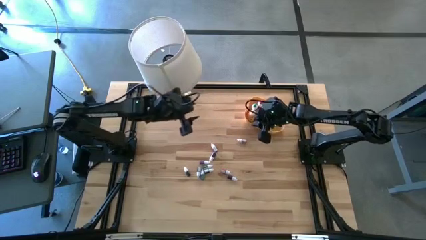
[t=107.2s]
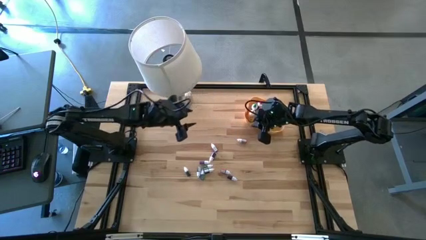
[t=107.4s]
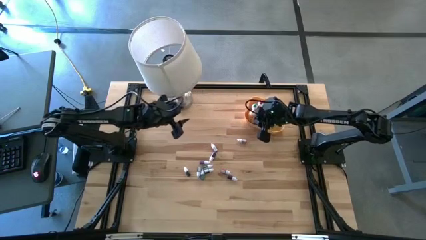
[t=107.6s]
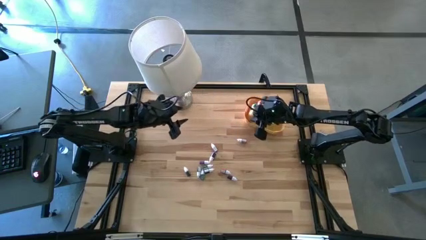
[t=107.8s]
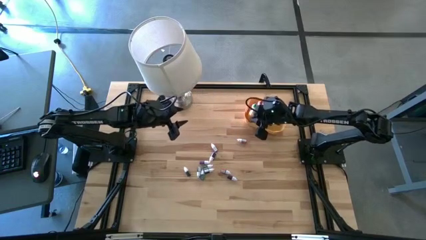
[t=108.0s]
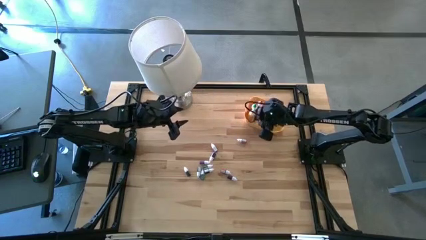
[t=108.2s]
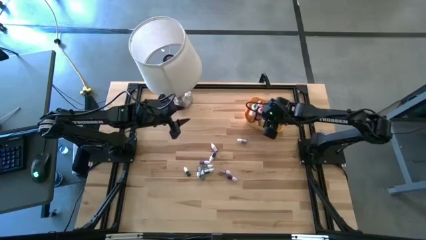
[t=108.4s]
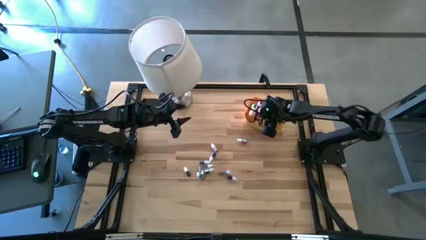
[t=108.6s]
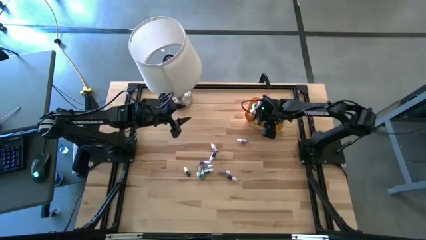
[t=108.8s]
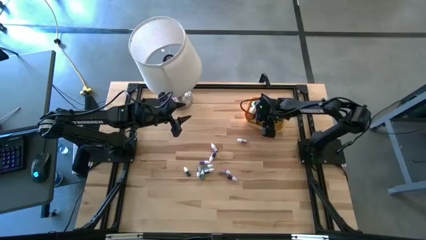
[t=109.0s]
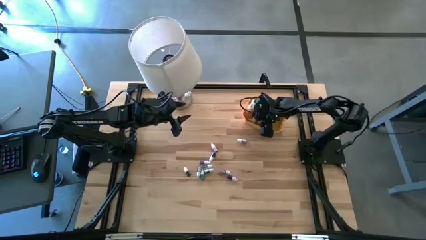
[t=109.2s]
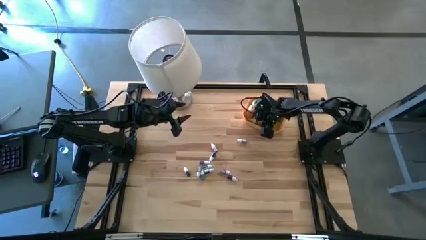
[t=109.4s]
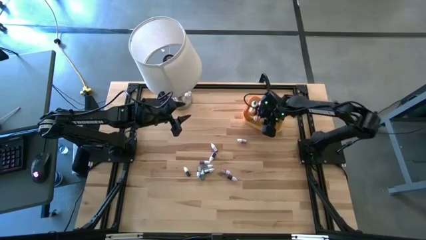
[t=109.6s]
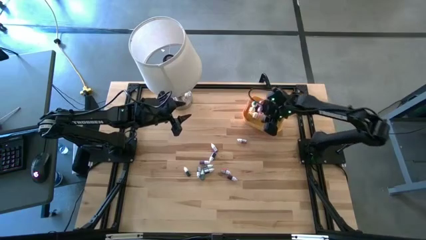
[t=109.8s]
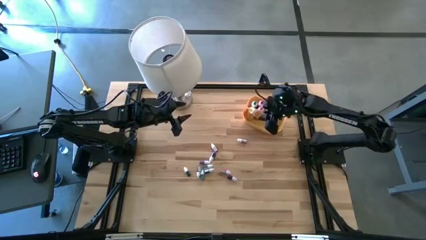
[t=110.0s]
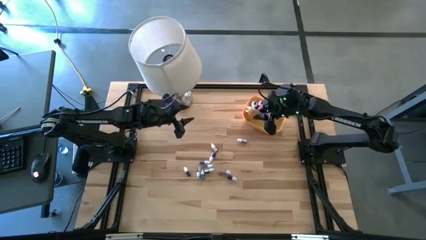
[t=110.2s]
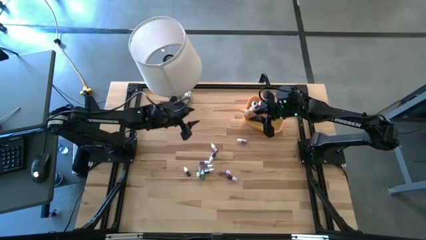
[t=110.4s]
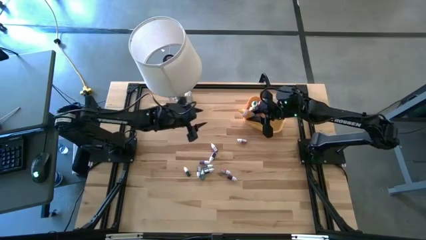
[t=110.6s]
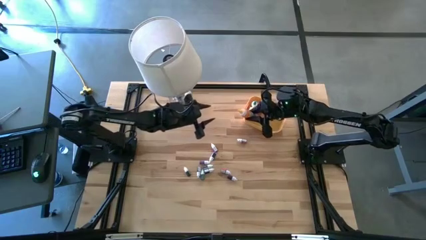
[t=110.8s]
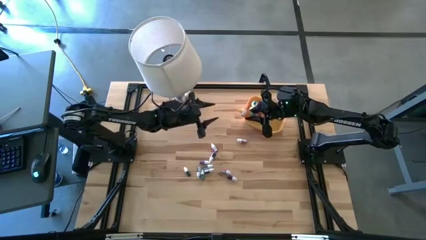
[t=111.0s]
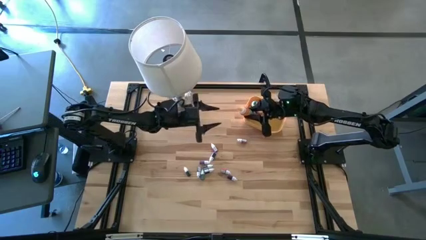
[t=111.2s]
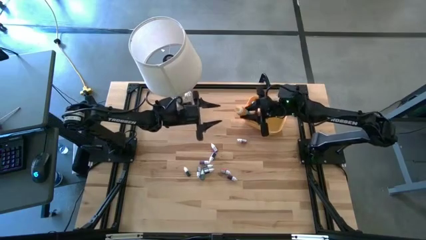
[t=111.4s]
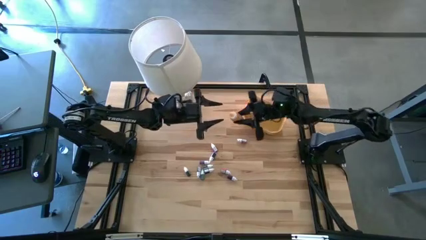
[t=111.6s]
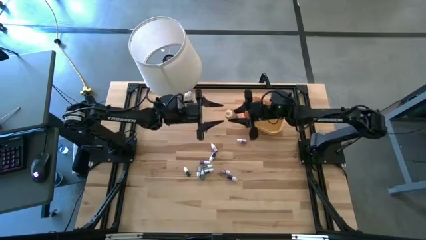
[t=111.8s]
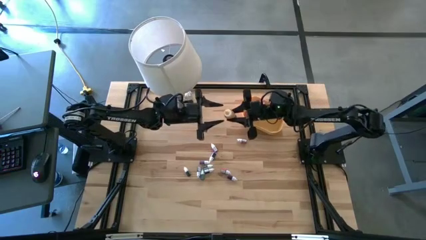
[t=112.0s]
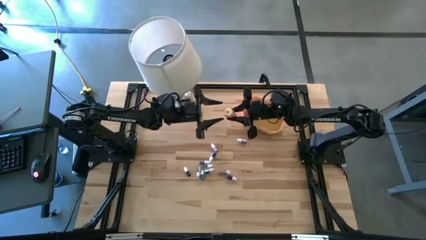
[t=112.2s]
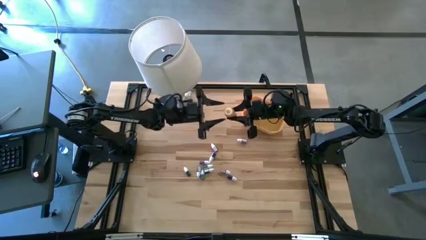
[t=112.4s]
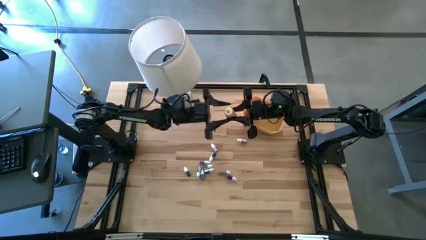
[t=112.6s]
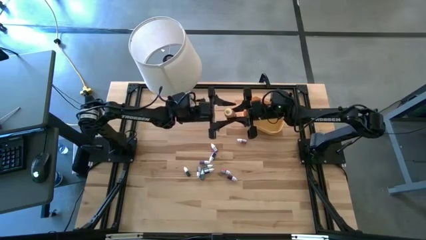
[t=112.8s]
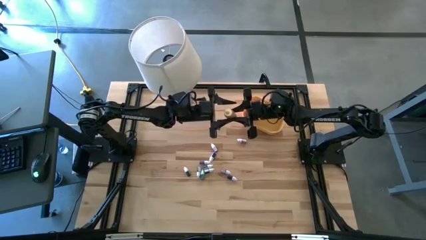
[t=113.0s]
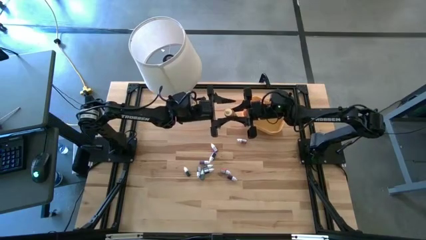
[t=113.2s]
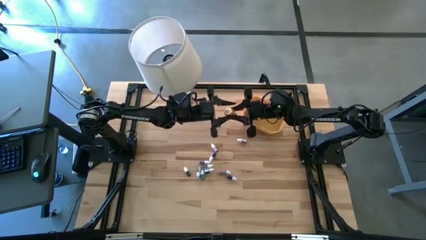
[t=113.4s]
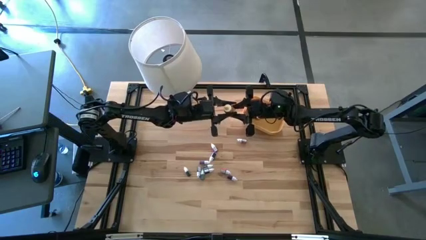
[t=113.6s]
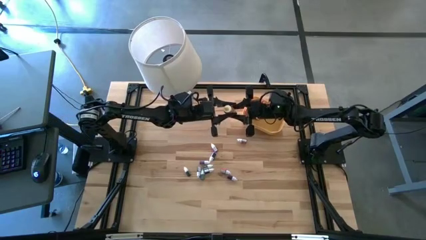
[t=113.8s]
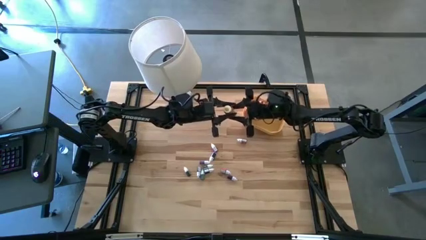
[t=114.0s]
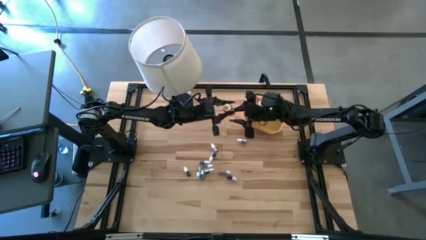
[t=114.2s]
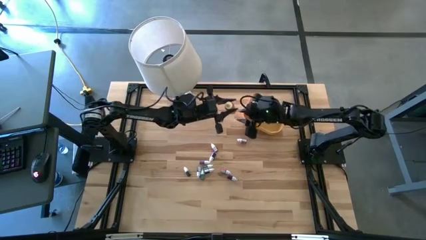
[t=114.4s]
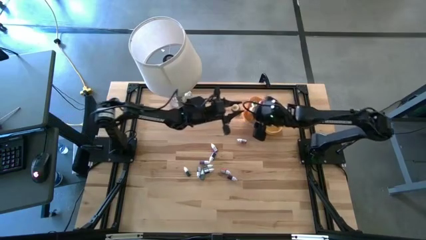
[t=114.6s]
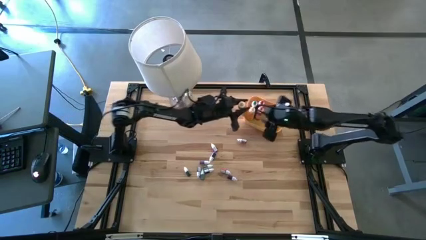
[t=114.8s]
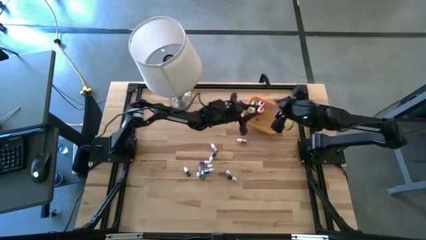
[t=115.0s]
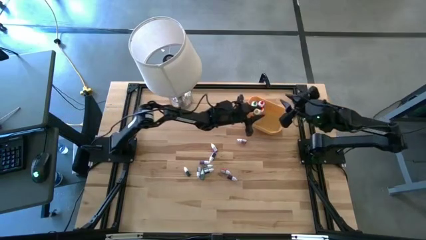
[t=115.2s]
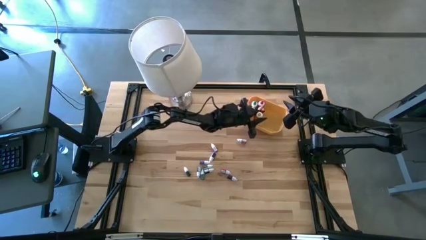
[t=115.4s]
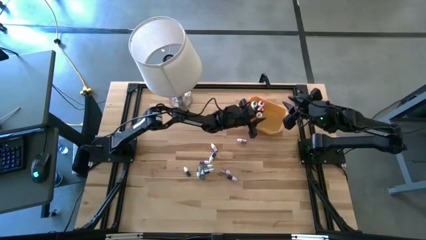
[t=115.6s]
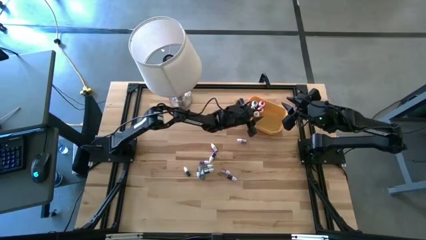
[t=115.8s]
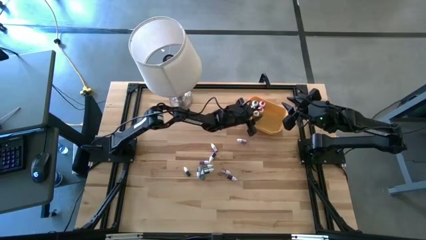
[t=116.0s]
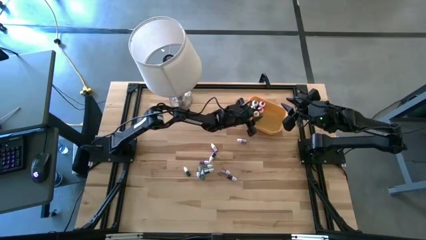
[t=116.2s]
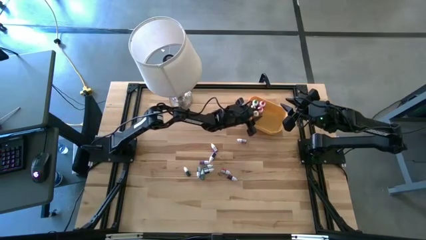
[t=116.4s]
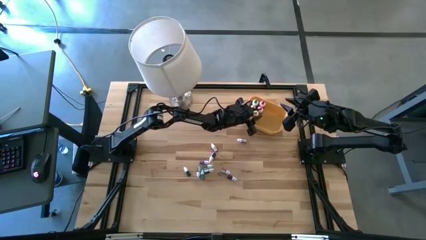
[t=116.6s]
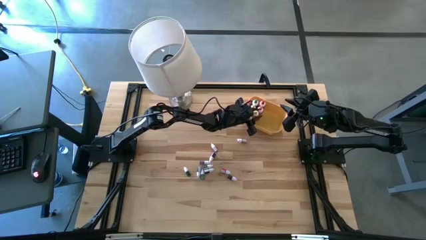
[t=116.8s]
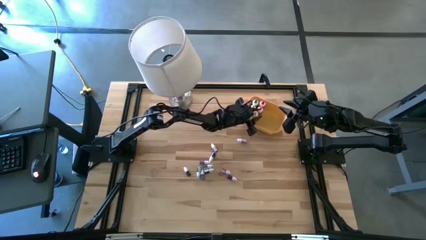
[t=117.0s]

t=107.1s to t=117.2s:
Task: Pick & Place food coloring
Adjust the large yellow food coloring bottle in the yellow bin

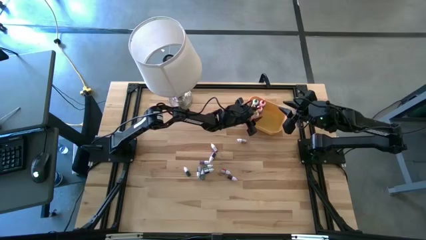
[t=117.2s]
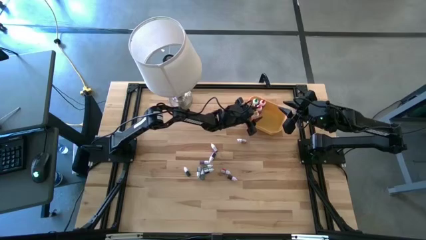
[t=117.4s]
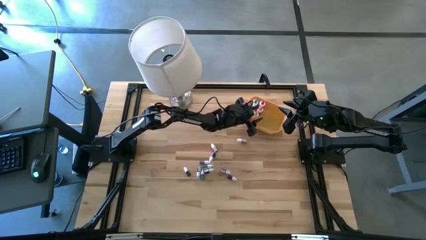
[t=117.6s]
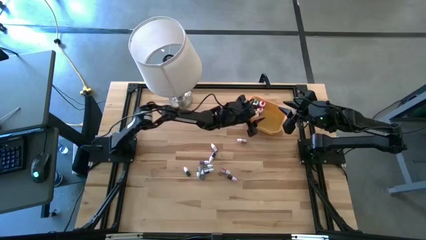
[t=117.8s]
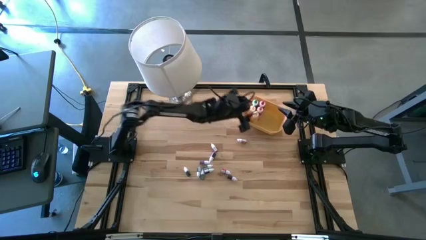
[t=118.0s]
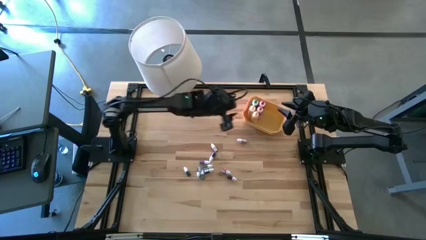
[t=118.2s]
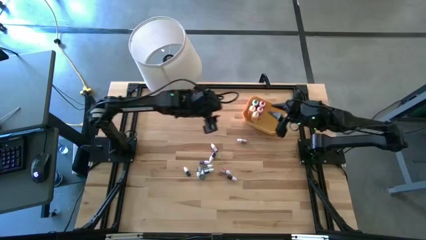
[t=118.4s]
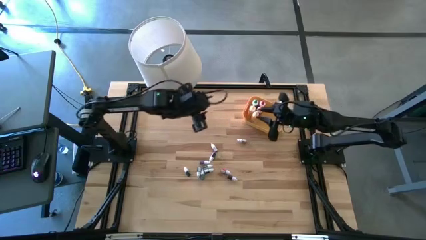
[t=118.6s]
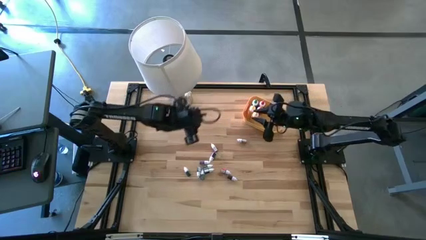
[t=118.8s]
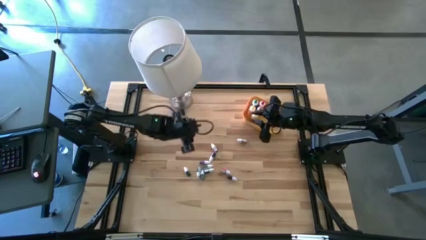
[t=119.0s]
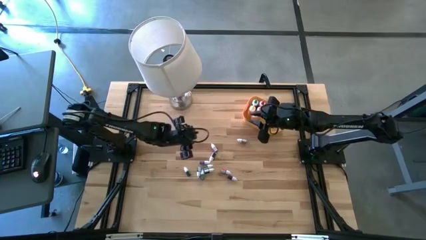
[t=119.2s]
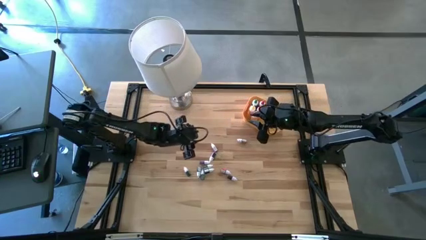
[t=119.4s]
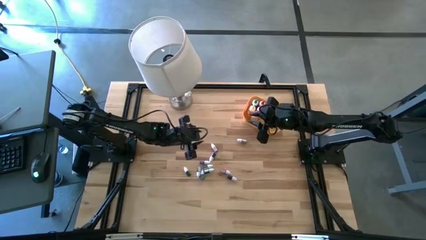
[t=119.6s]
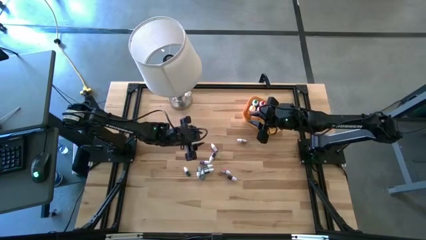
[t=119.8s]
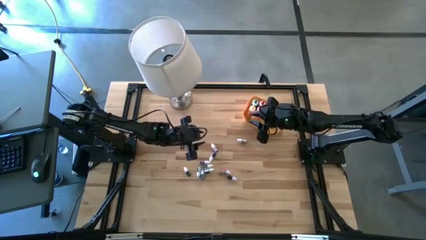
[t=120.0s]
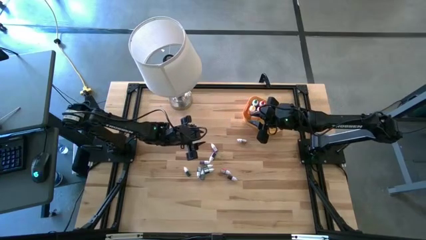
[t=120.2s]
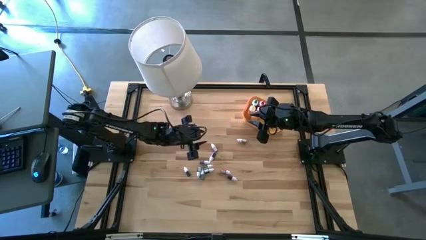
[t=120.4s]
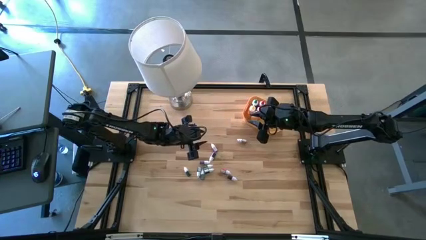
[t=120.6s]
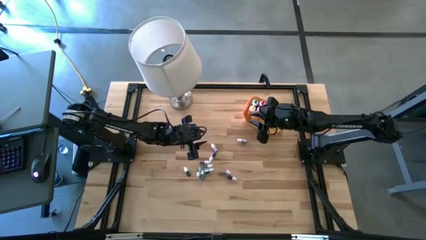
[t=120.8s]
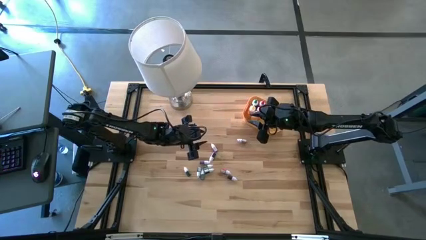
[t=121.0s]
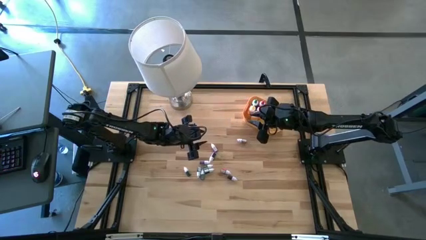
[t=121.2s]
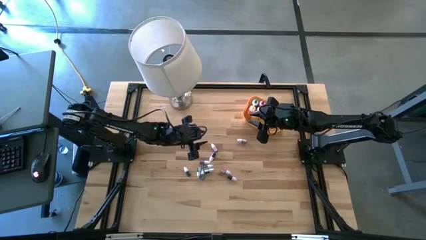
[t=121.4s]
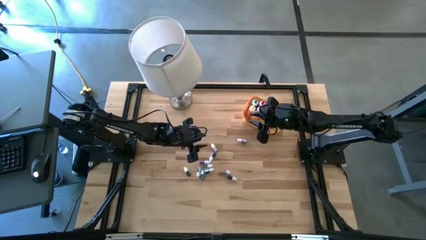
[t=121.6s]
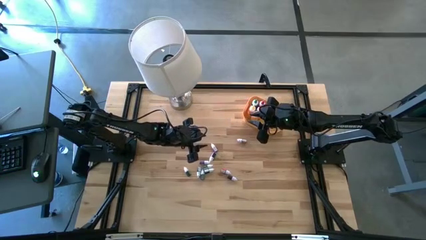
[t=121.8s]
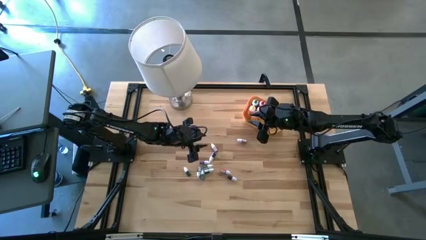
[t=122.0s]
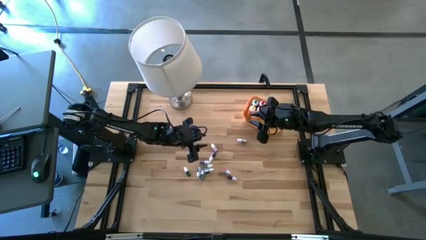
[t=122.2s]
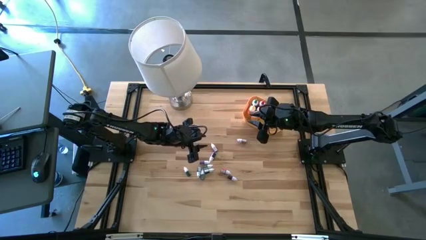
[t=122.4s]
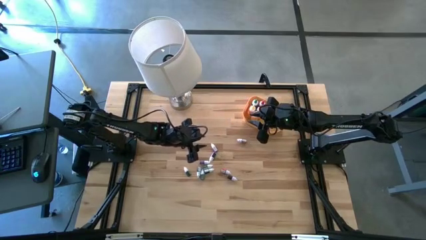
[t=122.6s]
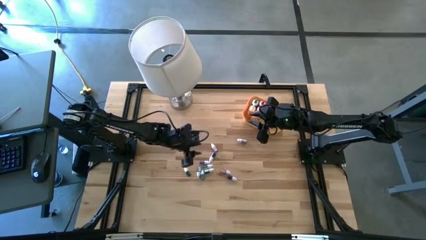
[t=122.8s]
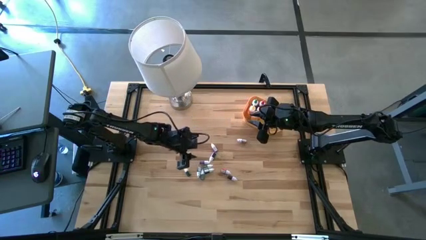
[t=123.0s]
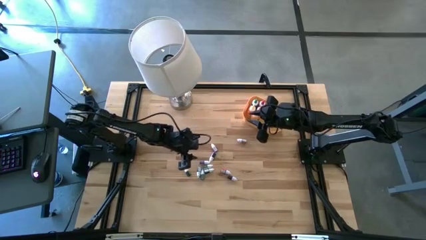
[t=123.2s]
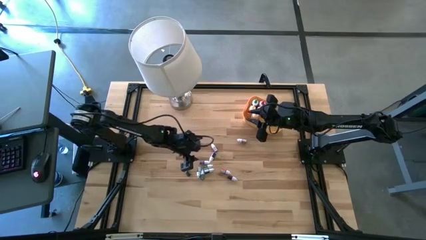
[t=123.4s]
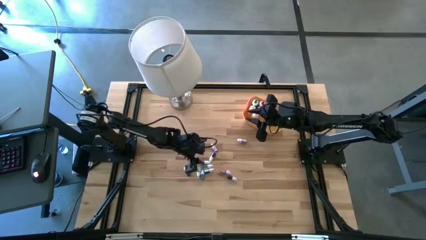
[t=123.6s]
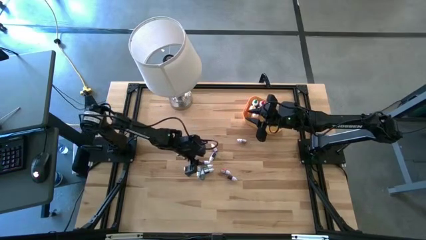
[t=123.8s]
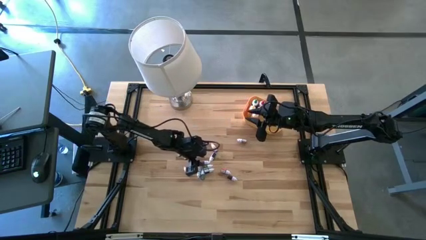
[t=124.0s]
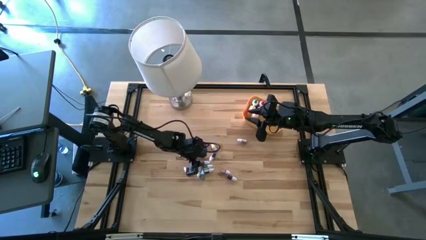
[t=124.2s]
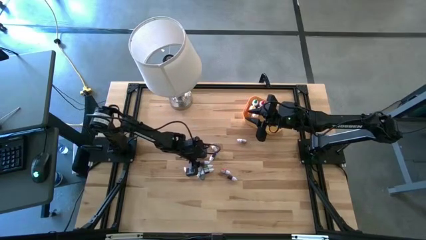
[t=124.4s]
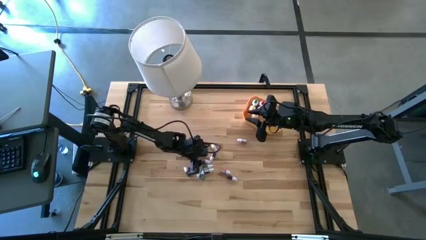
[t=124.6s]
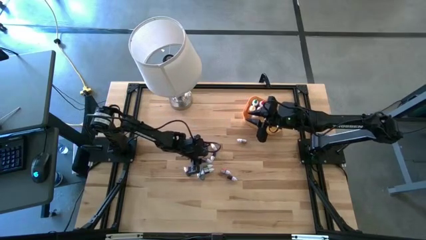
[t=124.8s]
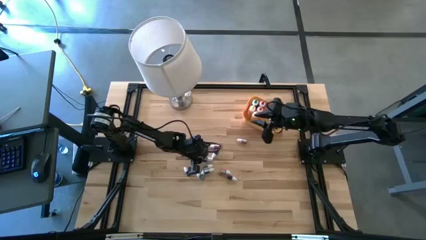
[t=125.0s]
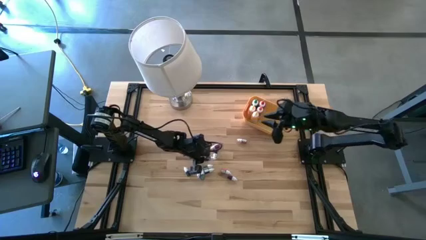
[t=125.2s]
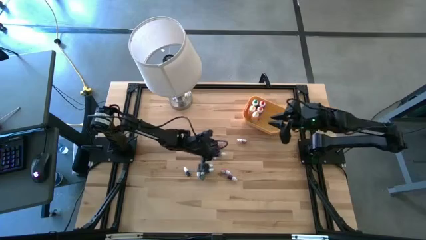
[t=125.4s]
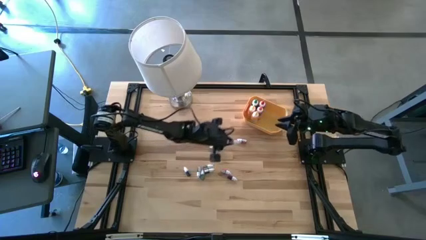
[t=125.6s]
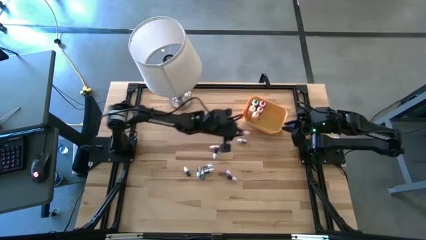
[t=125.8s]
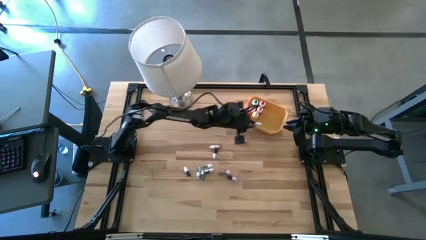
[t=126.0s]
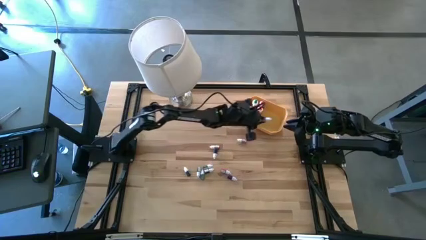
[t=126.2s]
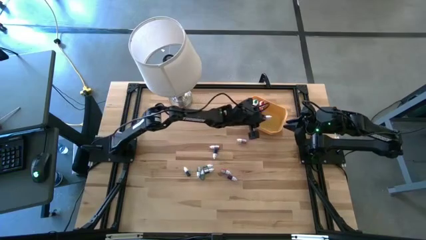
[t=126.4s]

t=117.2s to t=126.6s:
Put the small purple food coloring bottle into the yellow bin
